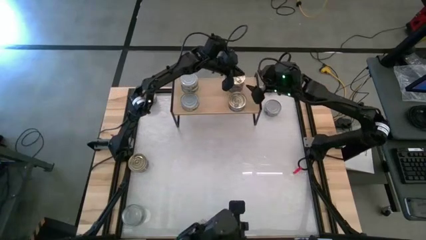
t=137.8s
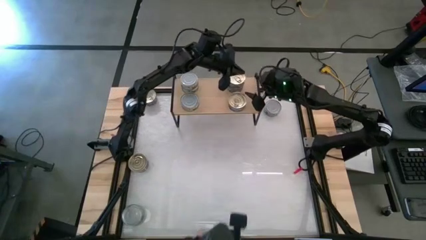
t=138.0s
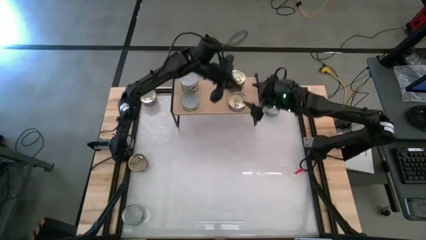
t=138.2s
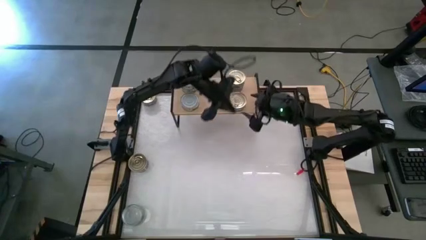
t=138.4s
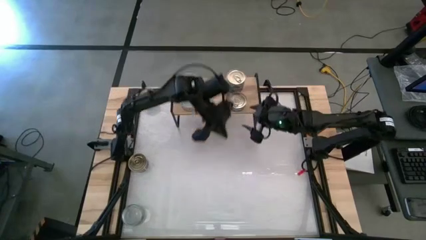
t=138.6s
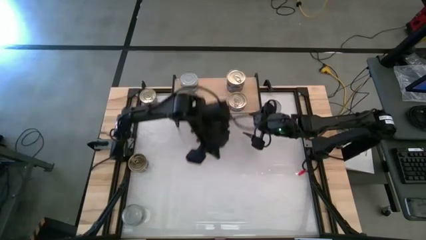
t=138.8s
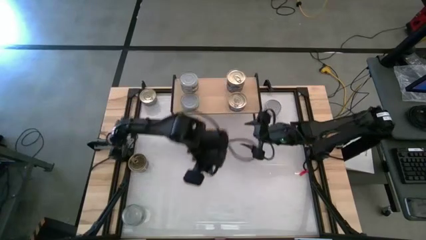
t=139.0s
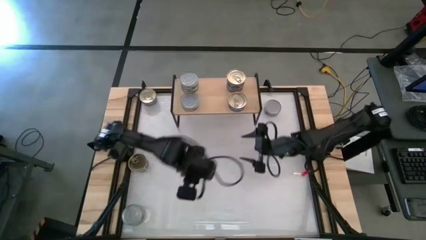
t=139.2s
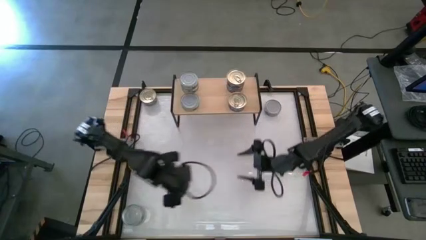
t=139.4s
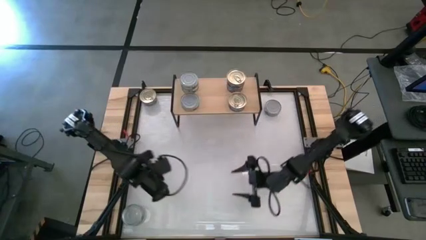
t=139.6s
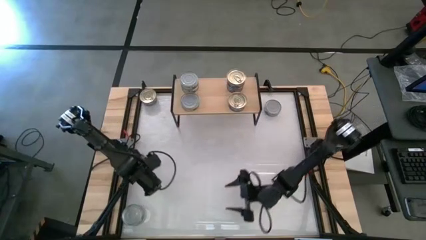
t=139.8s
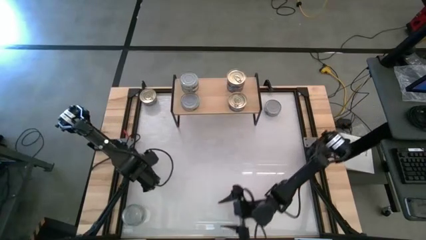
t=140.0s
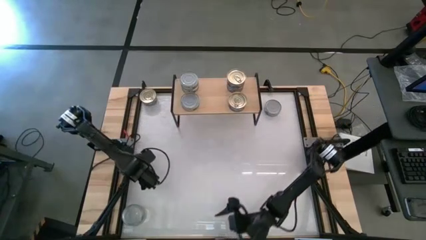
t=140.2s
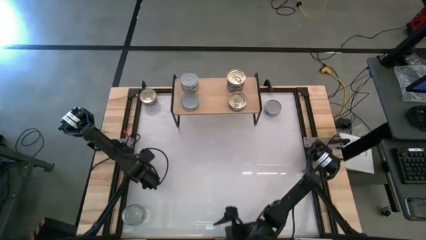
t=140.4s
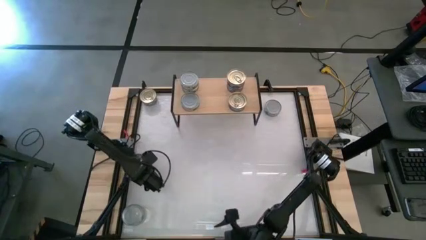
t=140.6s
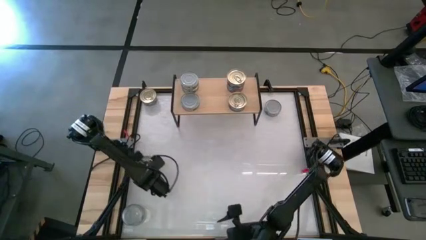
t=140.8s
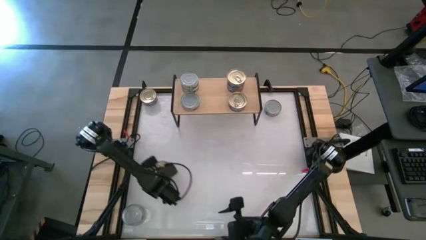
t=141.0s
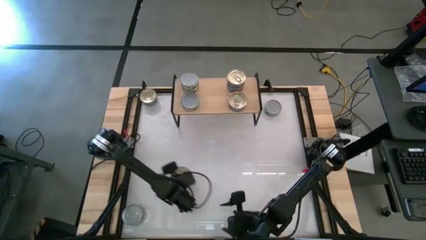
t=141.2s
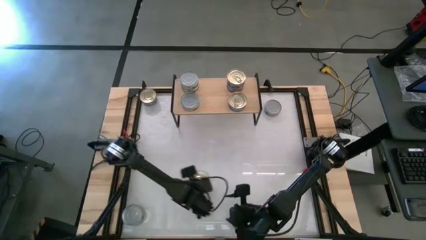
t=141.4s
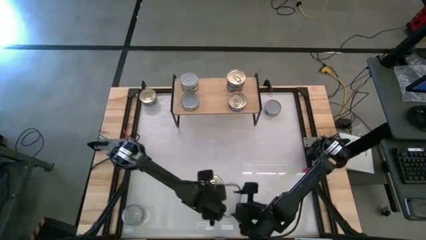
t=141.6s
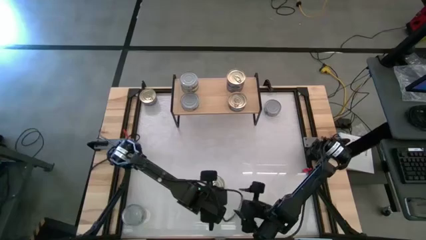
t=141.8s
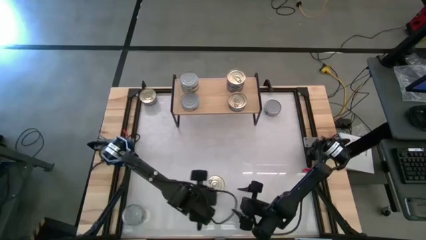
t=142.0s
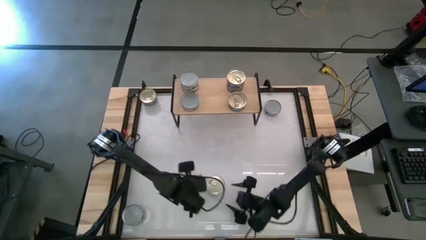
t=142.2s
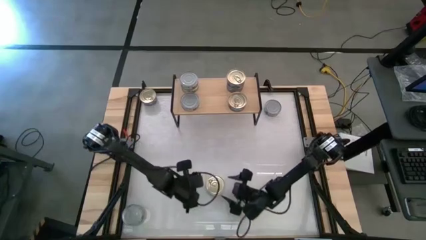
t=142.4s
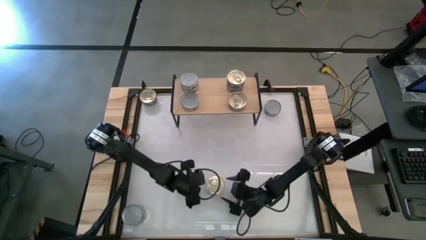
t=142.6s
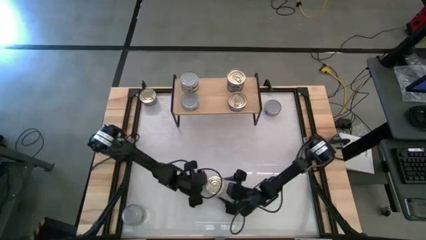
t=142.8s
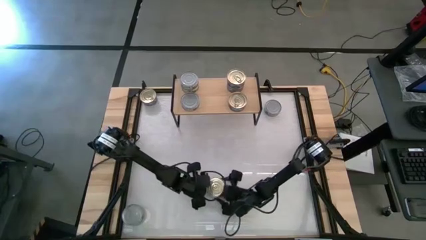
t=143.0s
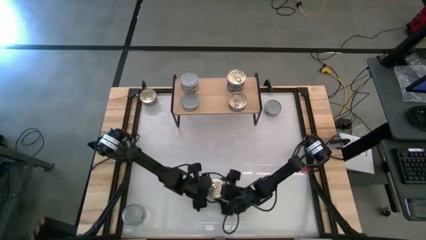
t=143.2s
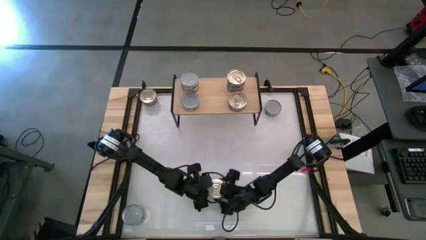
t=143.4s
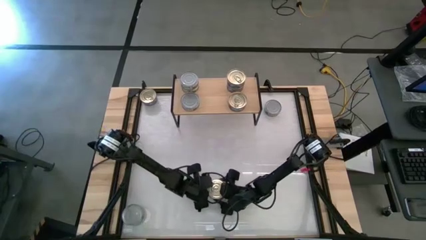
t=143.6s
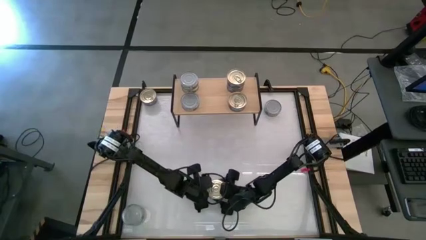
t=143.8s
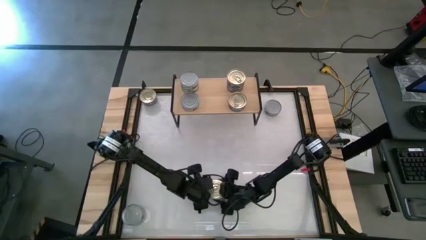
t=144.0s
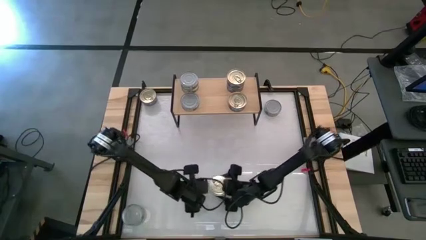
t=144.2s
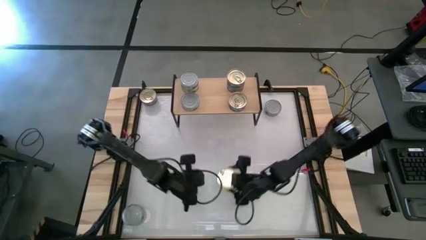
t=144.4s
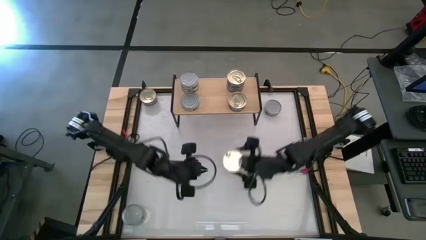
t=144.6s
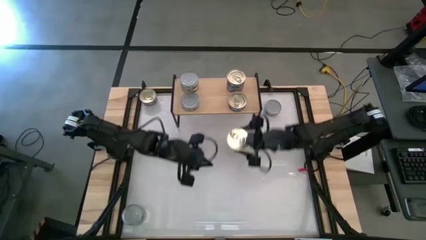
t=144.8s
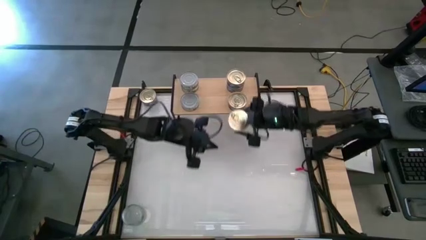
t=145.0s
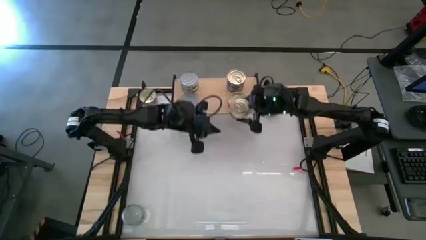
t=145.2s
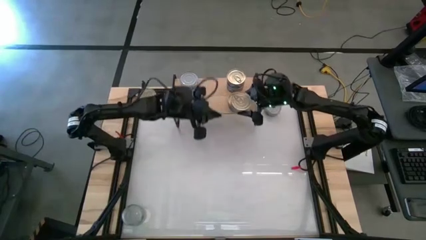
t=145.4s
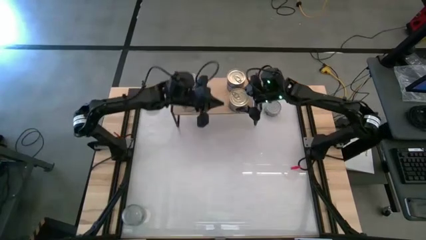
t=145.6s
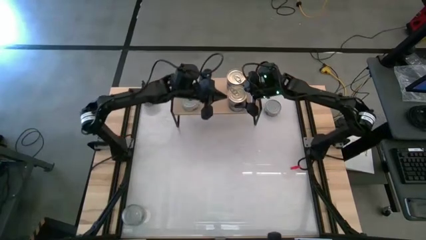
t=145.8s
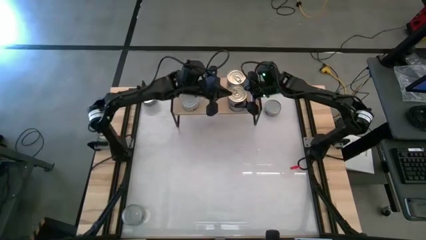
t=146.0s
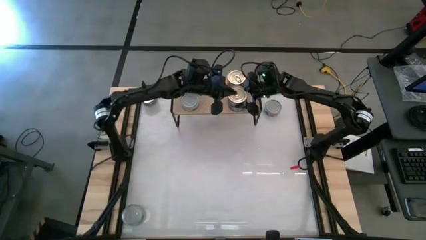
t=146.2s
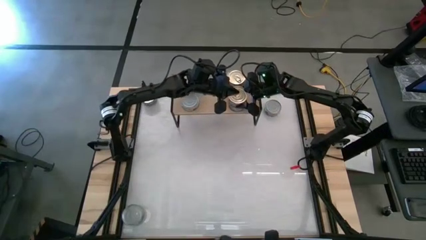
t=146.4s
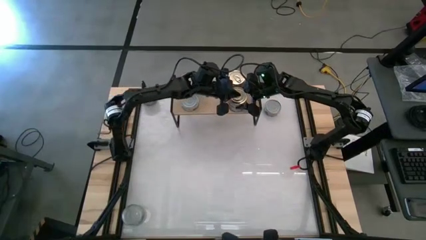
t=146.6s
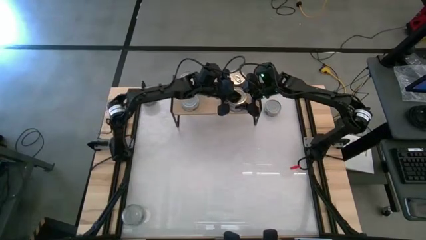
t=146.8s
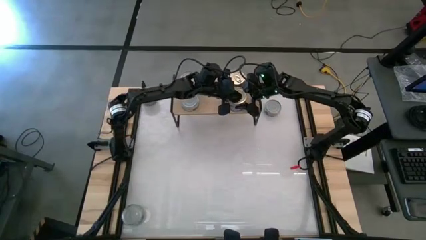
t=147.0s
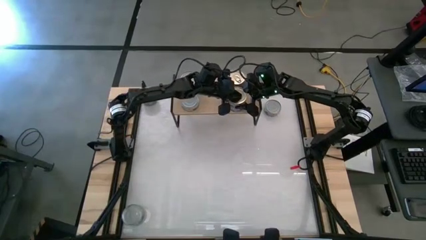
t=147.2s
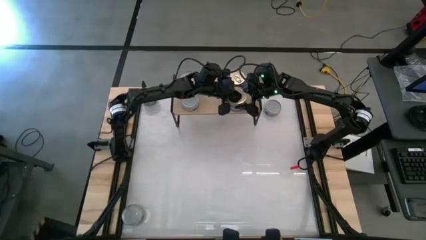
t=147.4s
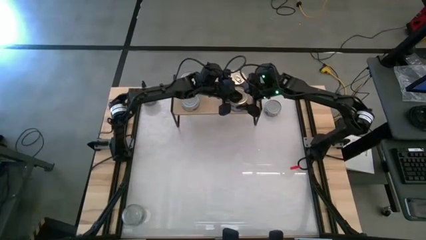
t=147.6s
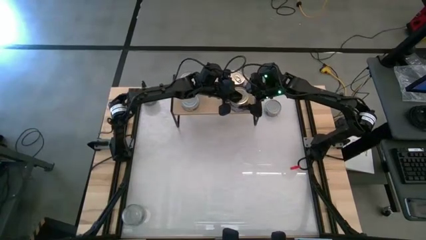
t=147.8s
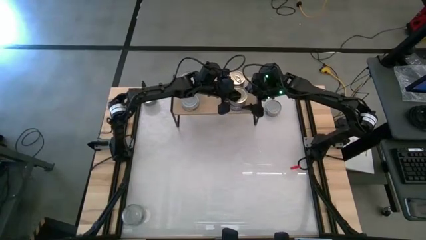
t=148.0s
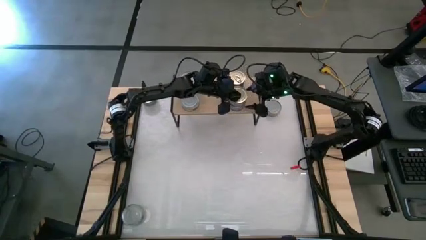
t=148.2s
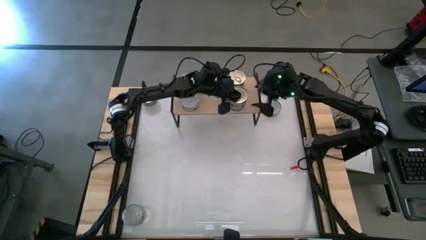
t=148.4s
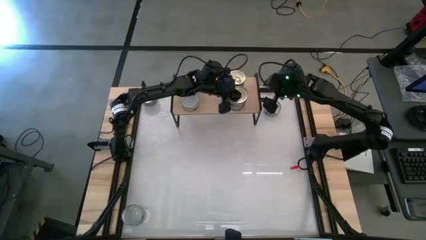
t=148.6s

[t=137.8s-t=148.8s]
Task: Stack canned seafood by type on shelf
Stack the blue tuna can on top of the blue tuna can on the shelf
